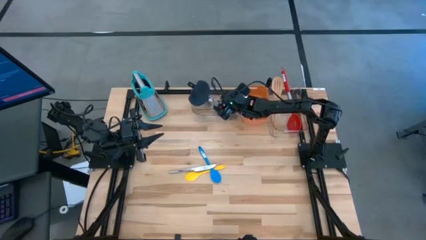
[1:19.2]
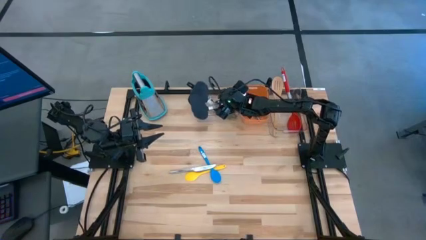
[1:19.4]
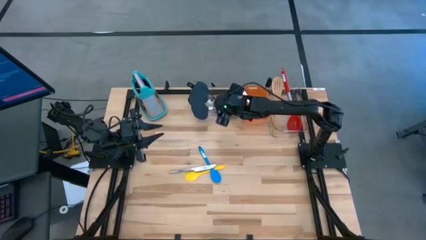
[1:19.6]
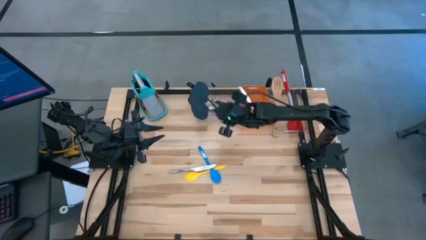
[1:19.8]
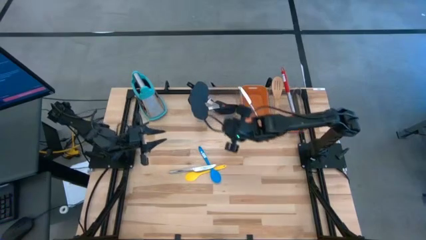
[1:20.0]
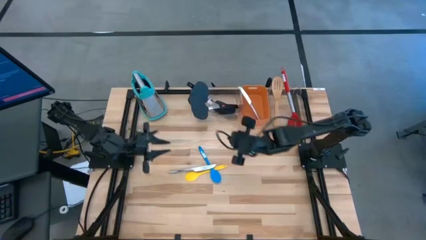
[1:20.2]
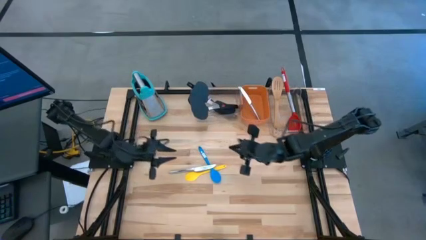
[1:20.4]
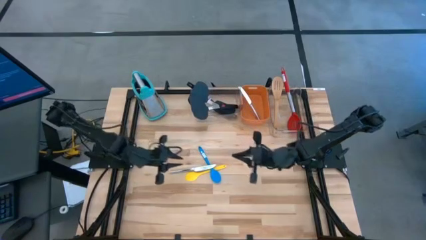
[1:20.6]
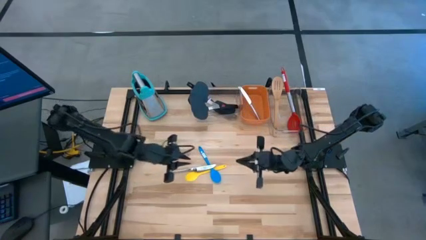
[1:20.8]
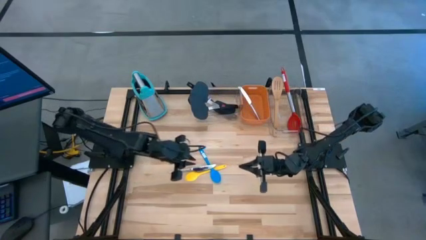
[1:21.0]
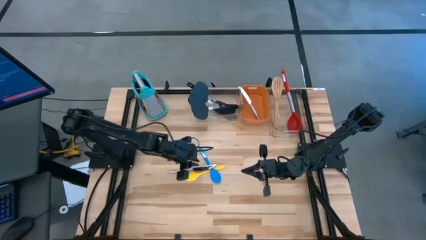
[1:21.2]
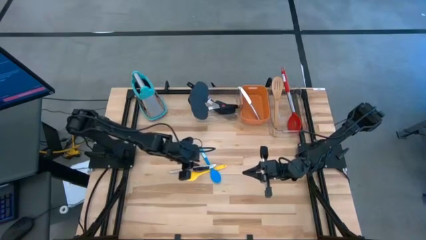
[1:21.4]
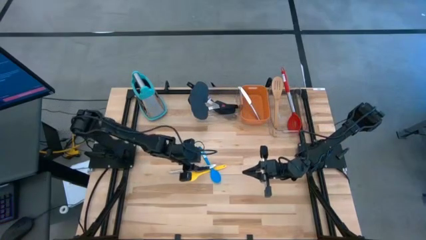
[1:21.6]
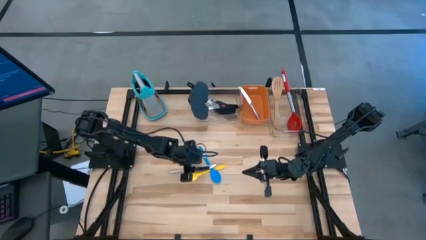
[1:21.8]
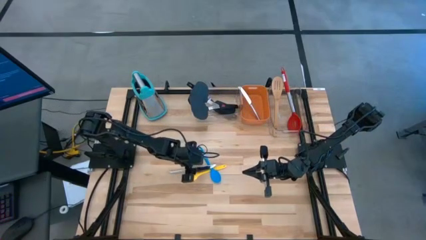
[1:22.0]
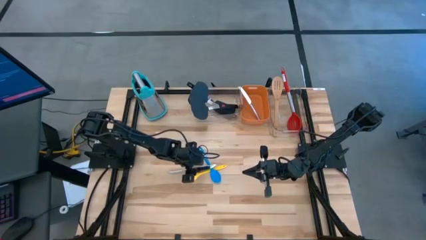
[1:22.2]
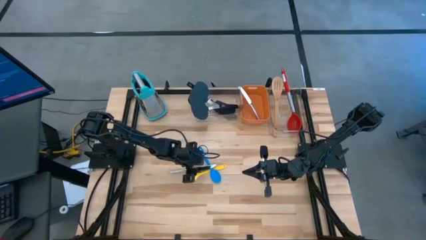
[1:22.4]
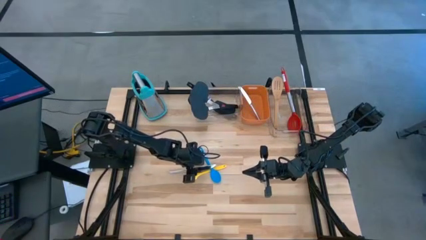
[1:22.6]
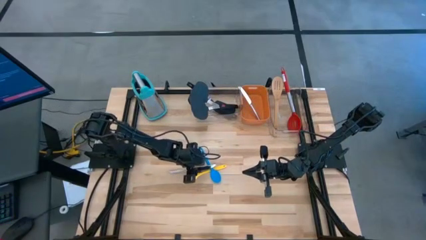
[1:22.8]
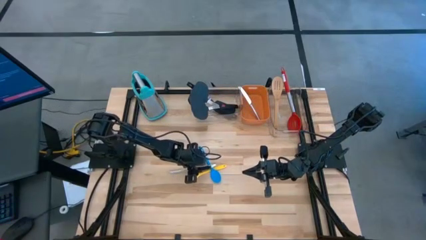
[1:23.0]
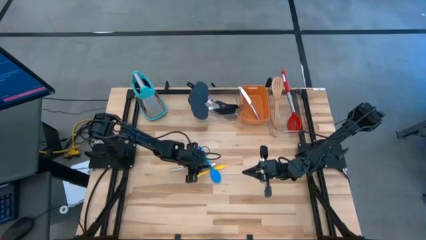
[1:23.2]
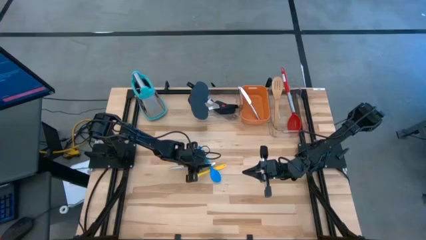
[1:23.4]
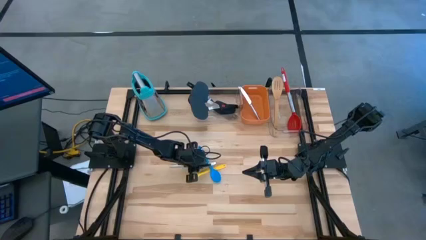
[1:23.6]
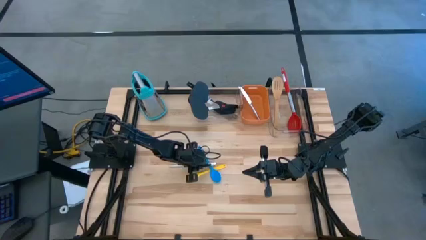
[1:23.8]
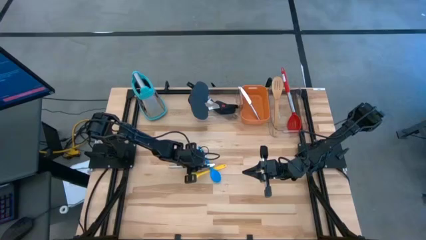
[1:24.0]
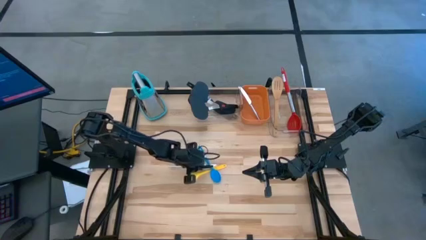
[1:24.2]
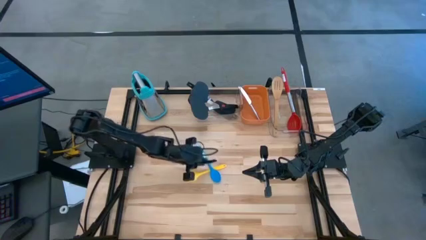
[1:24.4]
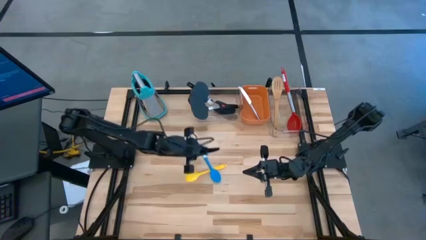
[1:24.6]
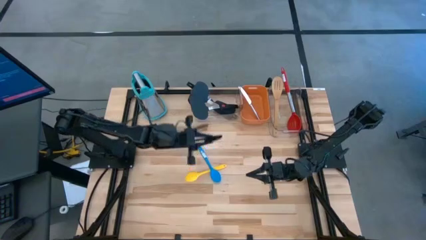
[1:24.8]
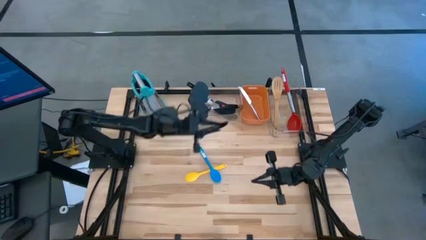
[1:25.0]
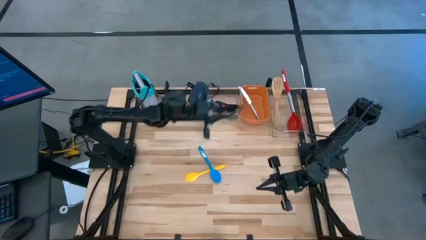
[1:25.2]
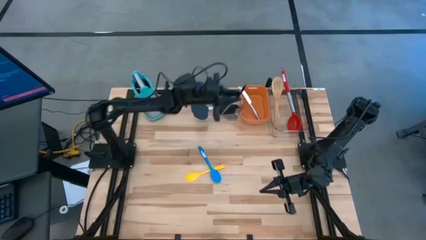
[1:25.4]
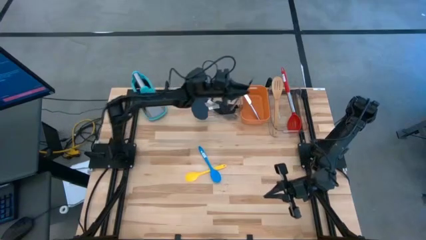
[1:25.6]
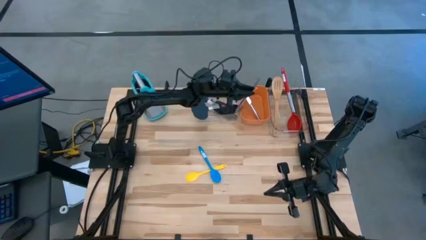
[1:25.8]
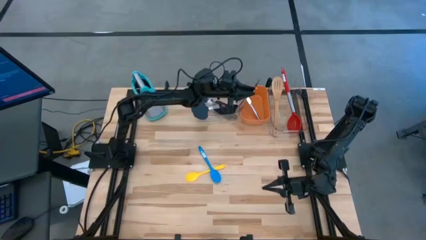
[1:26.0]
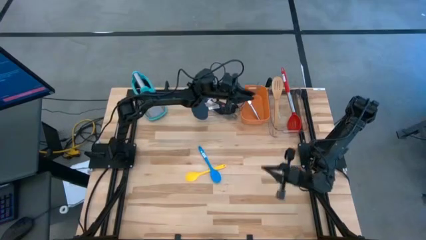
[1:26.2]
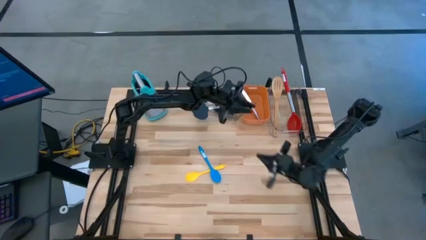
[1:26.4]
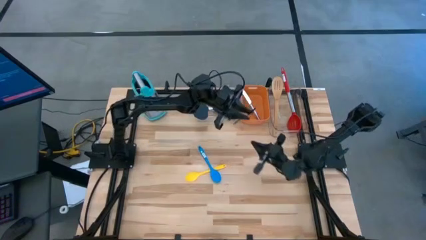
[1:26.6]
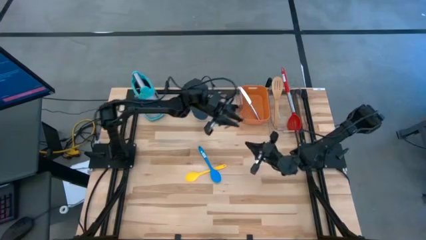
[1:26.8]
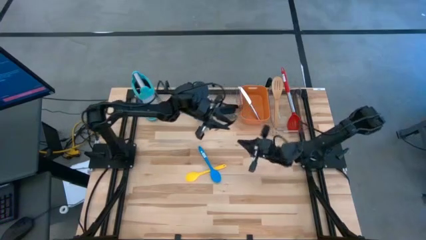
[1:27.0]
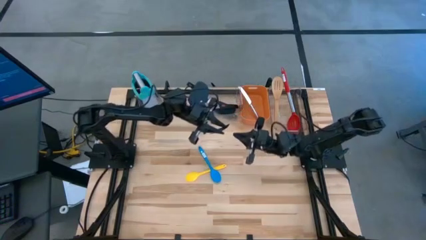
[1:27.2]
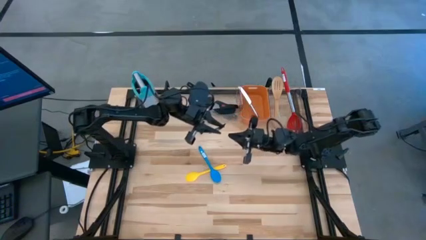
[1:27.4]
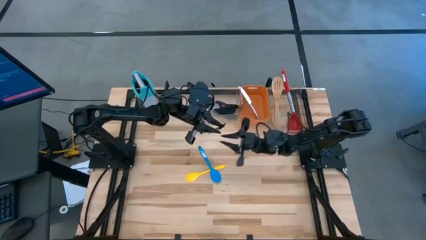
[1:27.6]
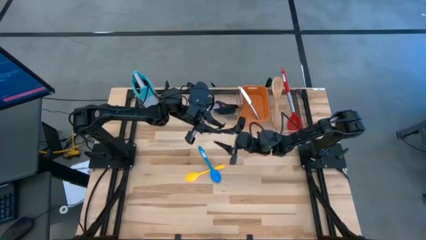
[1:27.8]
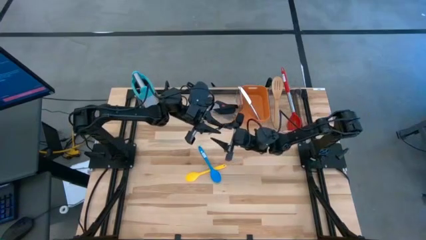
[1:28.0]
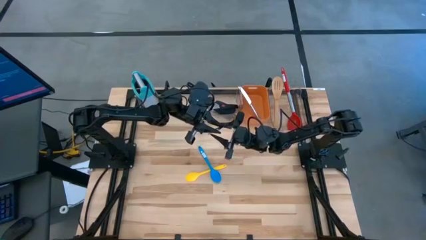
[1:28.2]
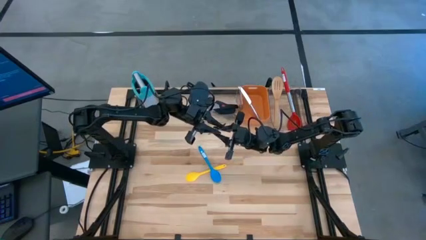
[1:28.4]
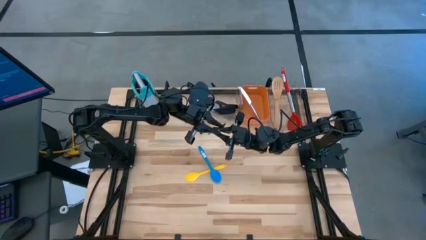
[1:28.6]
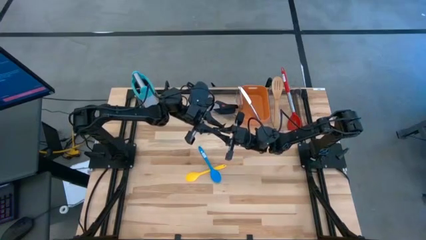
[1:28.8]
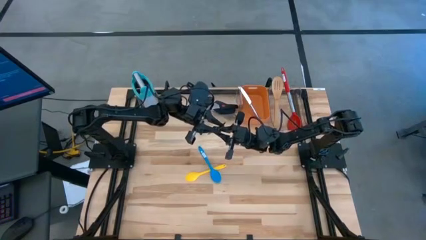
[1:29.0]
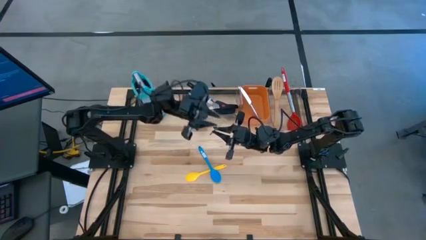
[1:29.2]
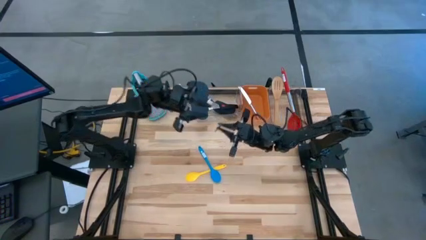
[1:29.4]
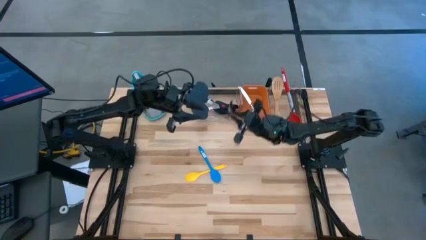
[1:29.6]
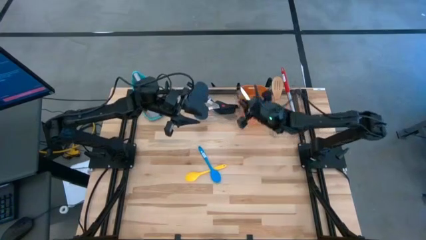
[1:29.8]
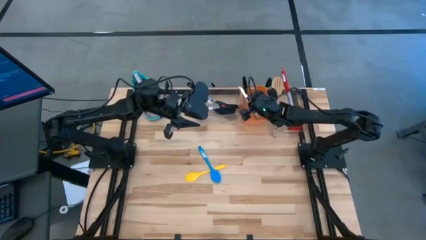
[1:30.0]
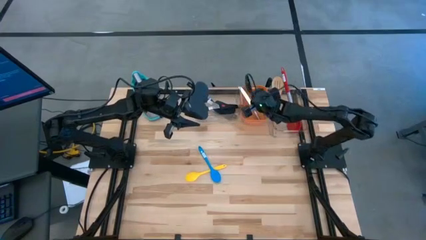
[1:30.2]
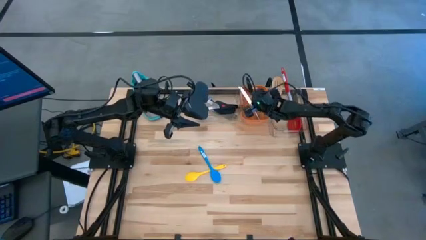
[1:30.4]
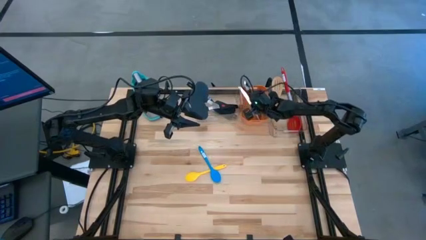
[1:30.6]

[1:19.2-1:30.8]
Task: Pick & Place Kitchen Items
Put the butter knife in the orange bin
